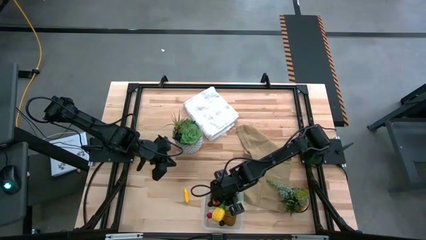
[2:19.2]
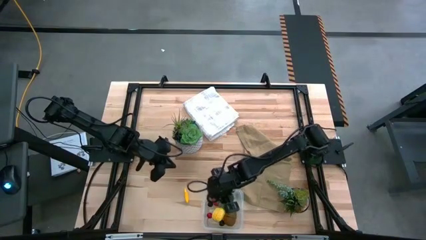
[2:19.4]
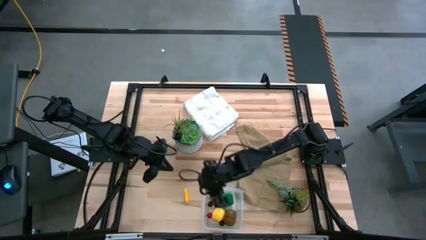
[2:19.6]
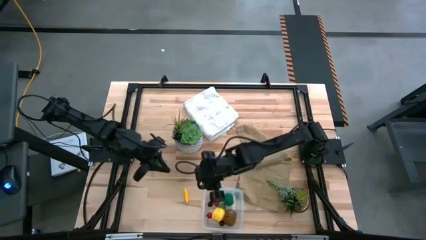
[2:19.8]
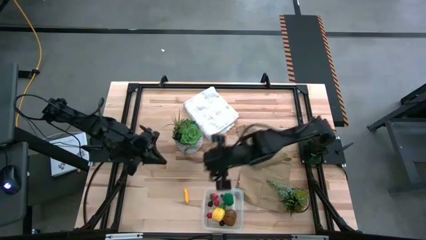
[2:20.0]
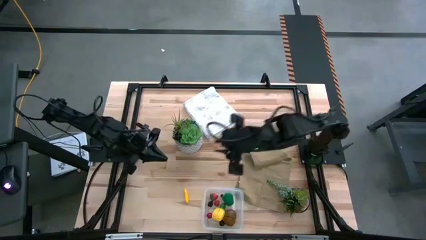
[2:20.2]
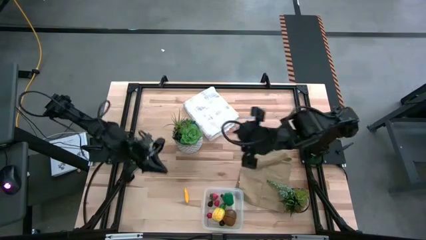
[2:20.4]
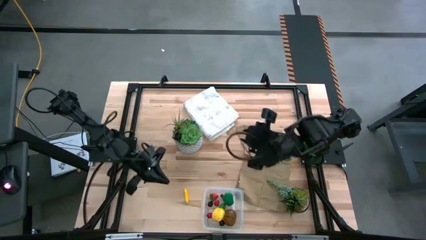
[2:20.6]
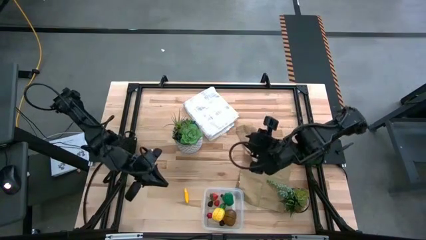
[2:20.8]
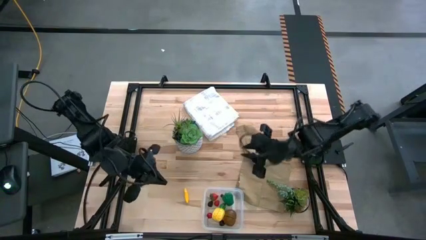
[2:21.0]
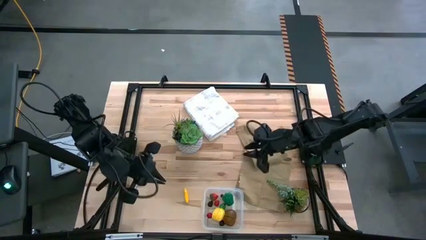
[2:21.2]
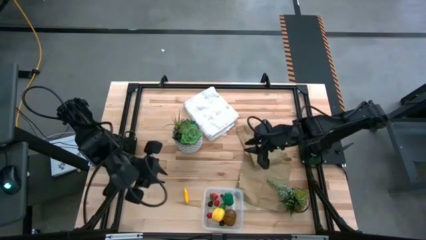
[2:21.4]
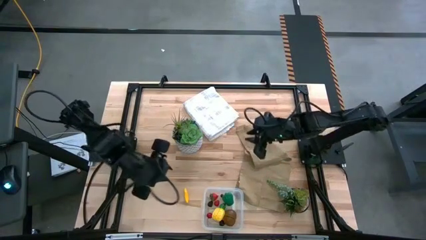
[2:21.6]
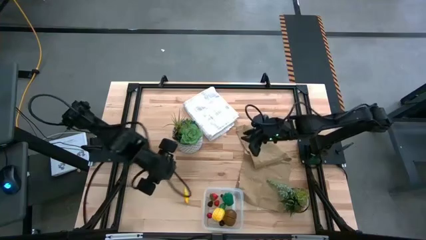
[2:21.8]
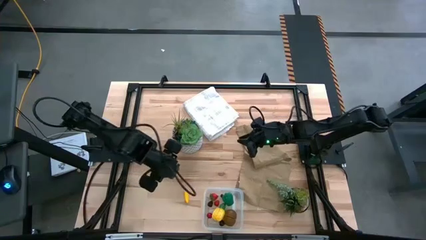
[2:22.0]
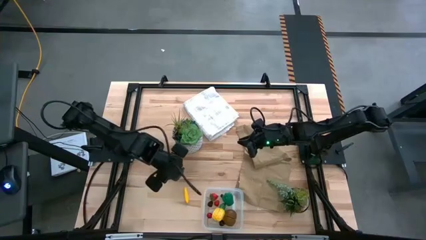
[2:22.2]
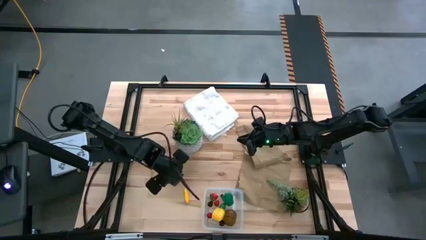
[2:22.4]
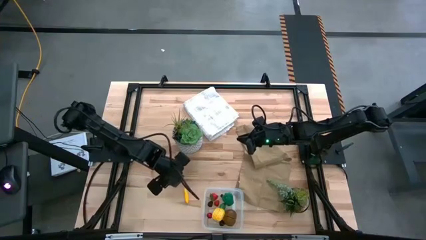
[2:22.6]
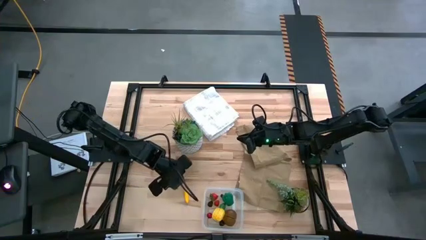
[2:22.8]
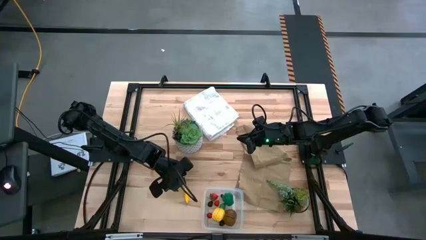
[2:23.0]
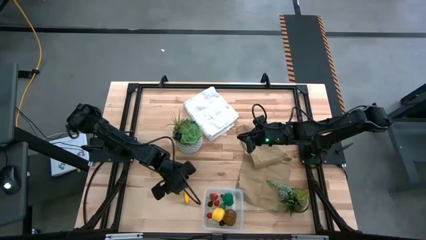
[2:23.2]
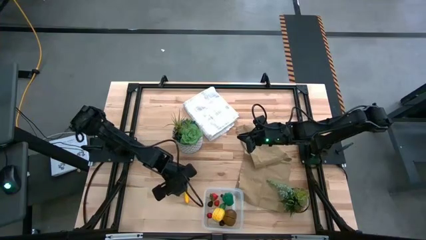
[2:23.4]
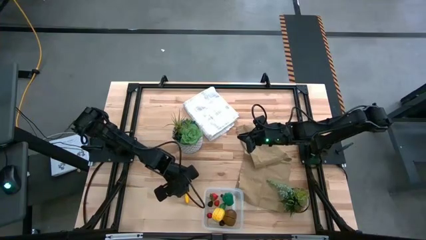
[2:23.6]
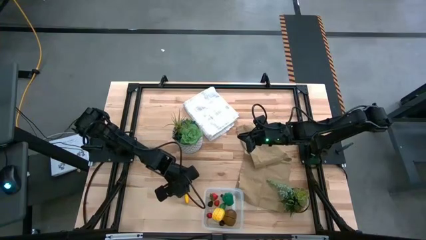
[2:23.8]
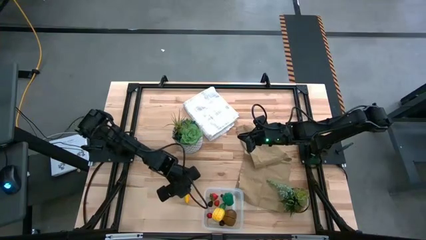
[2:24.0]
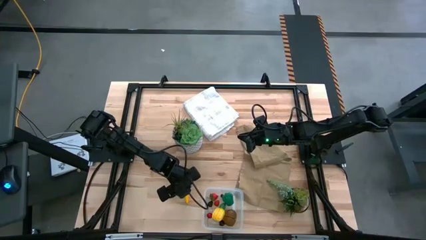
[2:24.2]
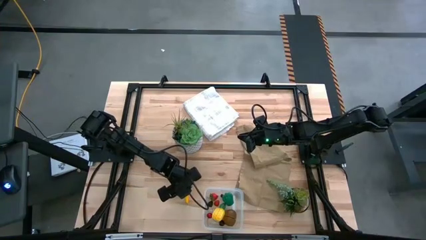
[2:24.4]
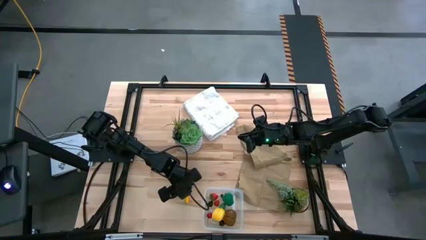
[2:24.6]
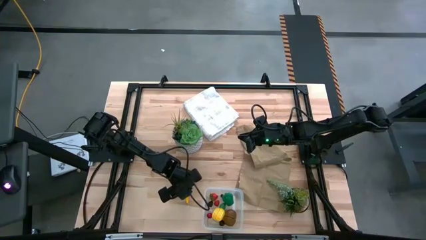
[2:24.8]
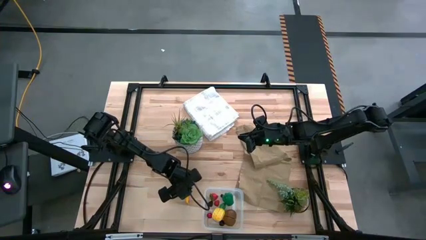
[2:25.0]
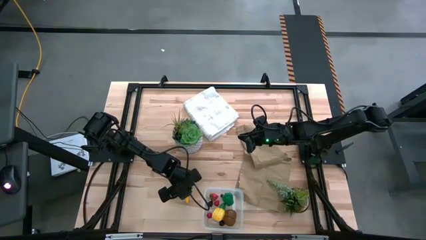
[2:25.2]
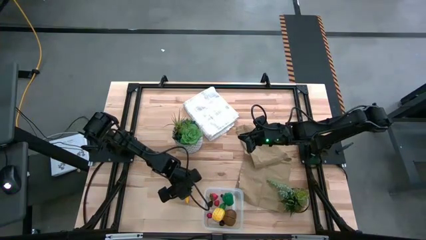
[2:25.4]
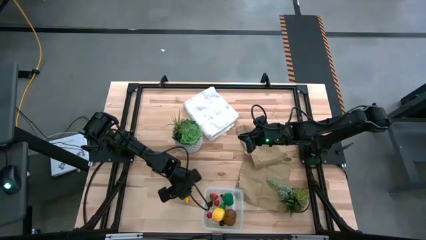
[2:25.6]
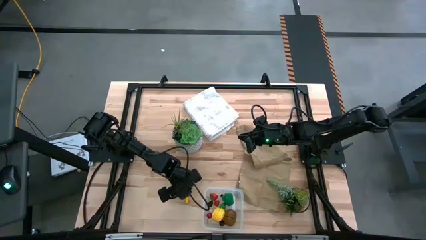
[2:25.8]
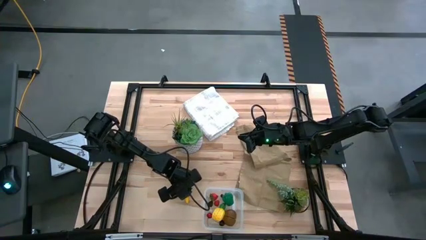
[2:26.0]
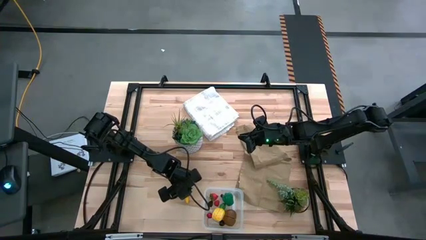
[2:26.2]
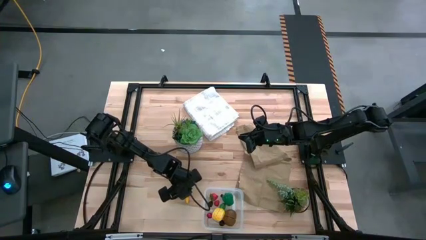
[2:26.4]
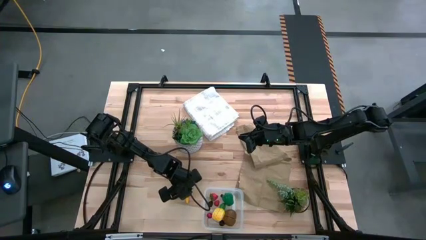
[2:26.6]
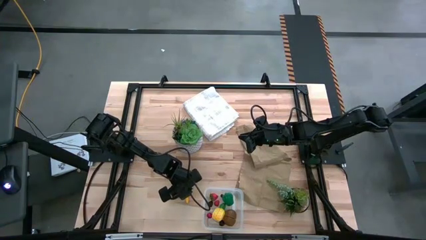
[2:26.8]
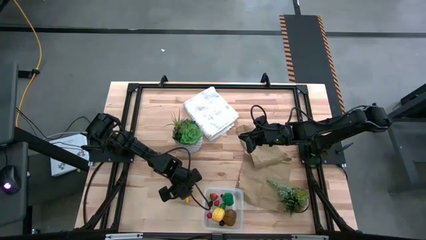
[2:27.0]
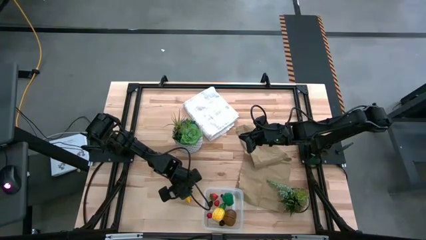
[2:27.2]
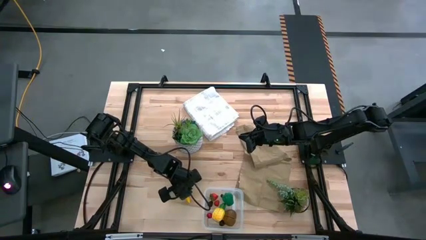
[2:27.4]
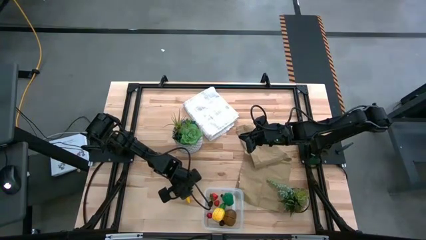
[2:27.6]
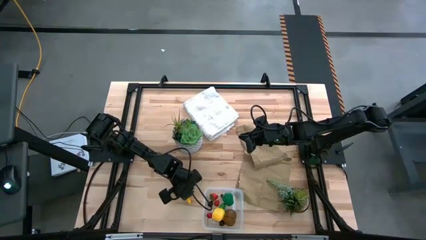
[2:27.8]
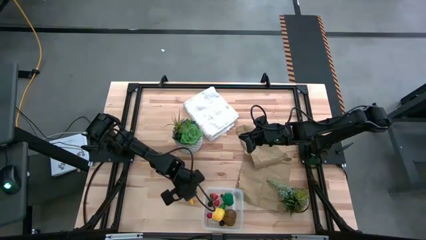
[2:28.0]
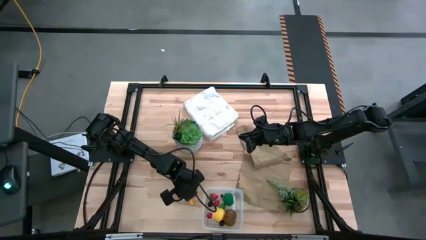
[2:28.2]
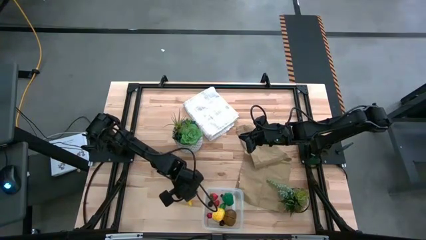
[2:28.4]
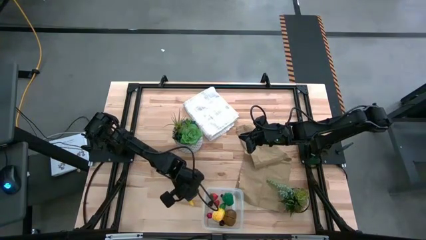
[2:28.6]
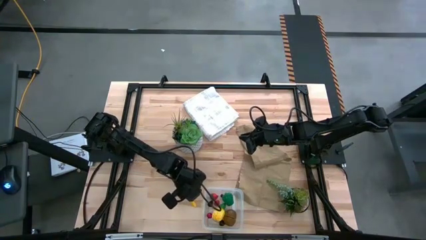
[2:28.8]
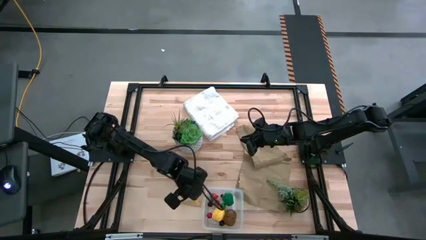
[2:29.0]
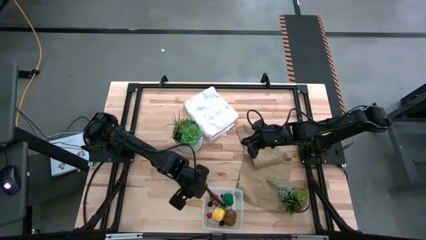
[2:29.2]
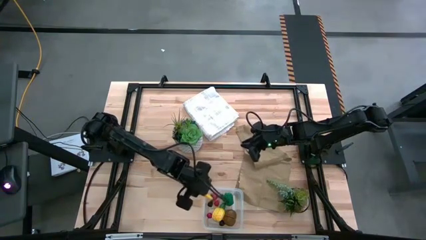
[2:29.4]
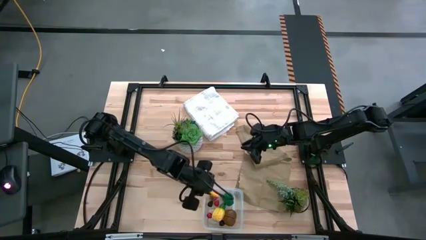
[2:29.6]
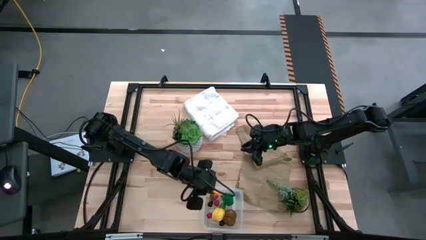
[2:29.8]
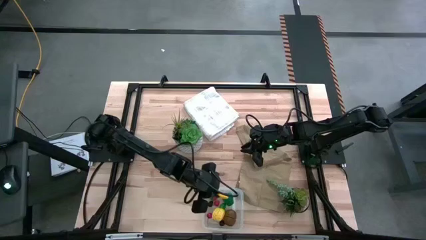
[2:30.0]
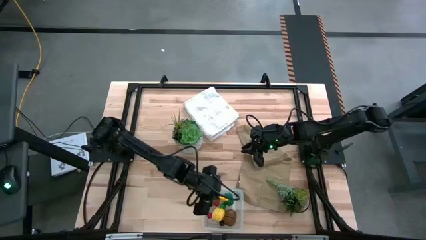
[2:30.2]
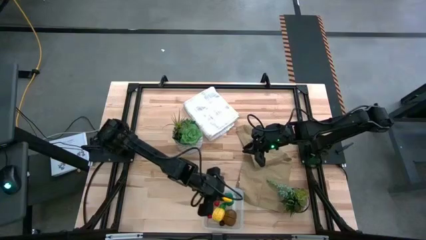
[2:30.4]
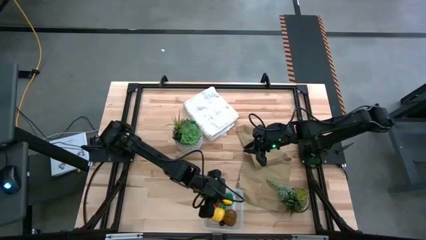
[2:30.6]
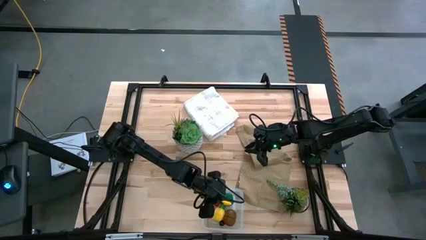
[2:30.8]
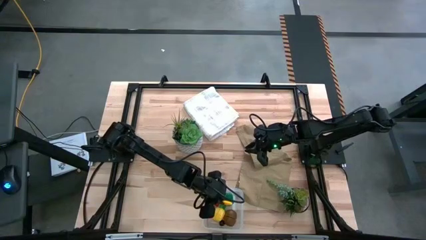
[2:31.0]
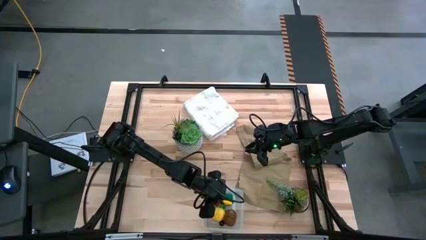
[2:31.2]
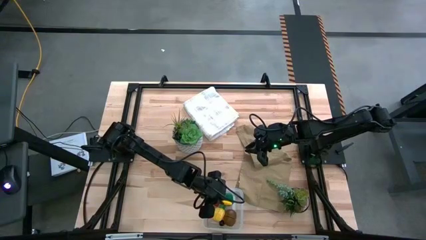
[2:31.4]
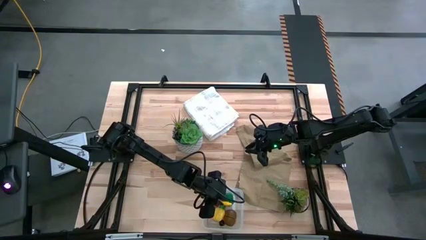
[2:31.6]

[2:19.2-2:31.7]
Task: Pick and placing Produce into tupperware
Put the yellow corn into the transparent bin

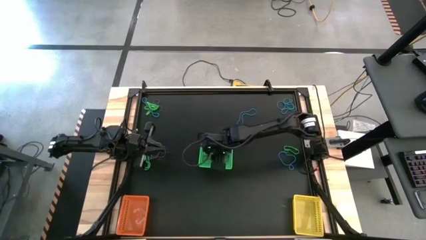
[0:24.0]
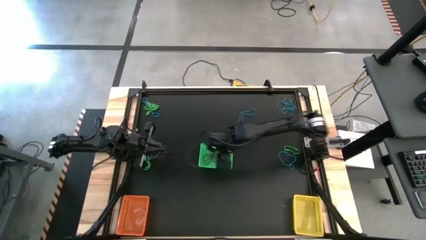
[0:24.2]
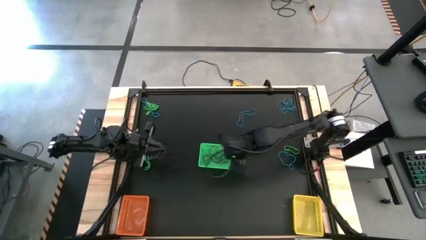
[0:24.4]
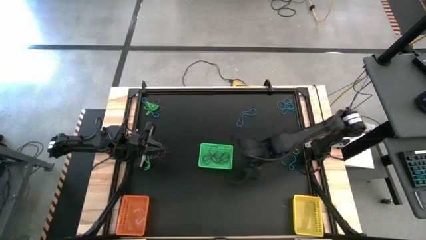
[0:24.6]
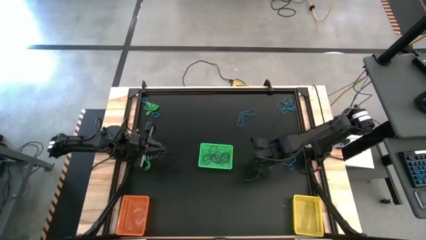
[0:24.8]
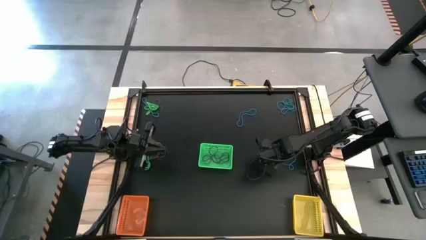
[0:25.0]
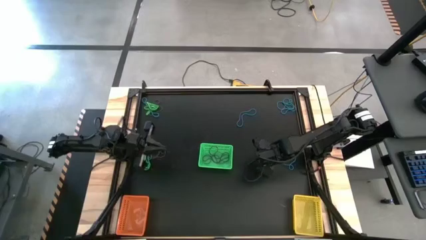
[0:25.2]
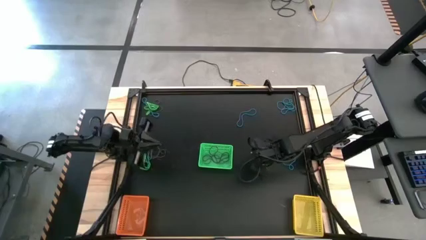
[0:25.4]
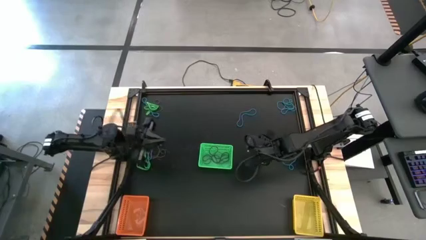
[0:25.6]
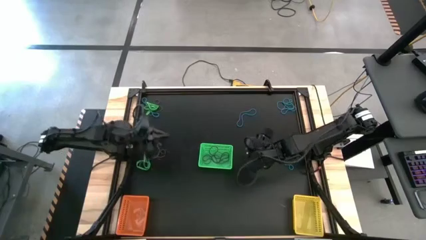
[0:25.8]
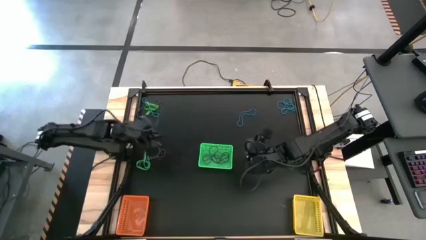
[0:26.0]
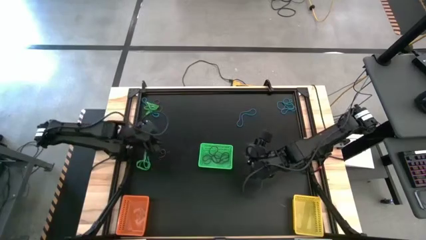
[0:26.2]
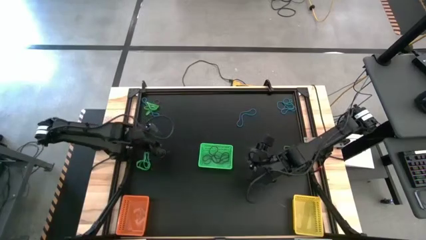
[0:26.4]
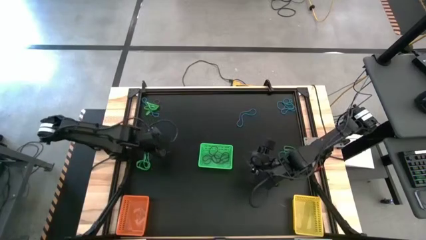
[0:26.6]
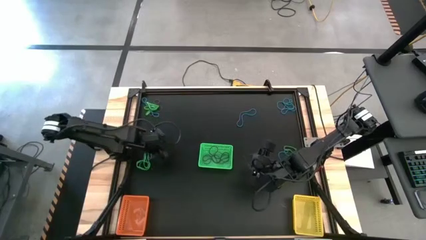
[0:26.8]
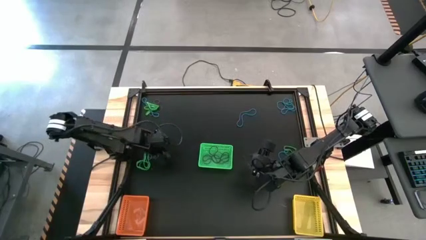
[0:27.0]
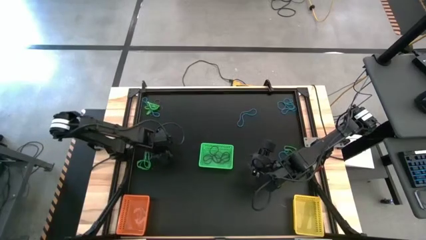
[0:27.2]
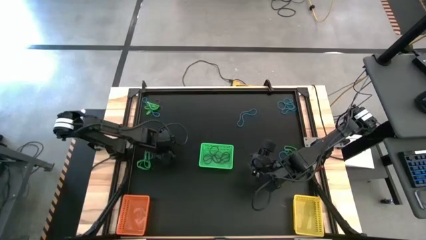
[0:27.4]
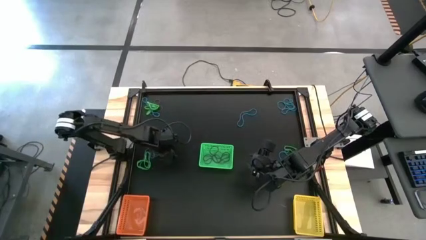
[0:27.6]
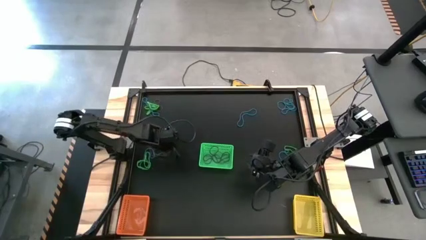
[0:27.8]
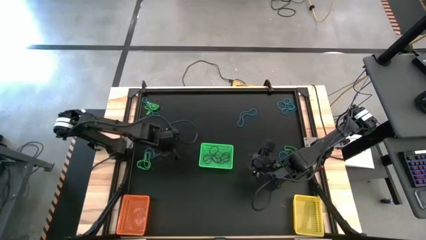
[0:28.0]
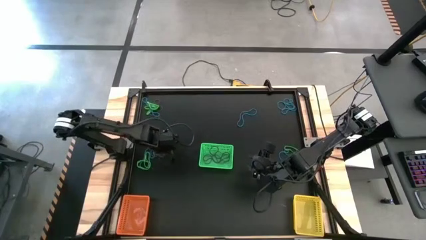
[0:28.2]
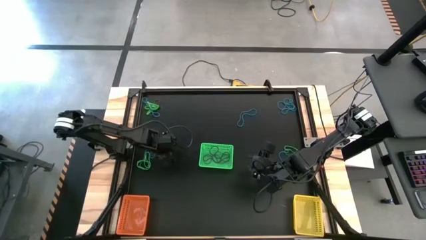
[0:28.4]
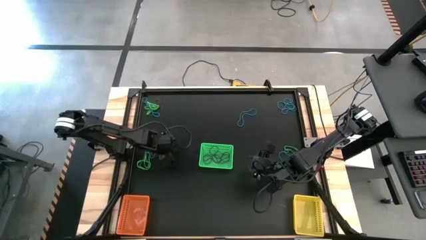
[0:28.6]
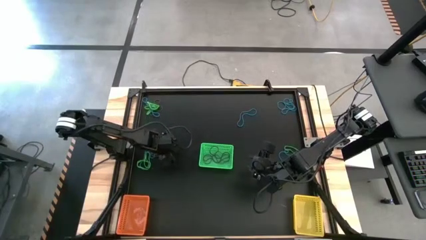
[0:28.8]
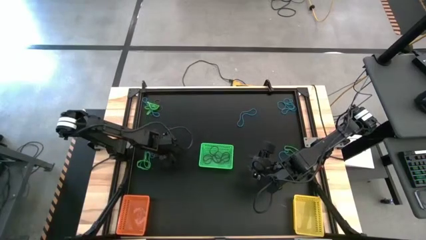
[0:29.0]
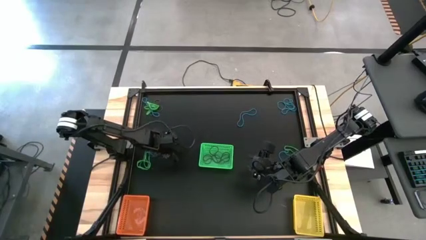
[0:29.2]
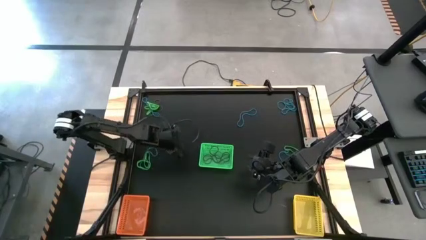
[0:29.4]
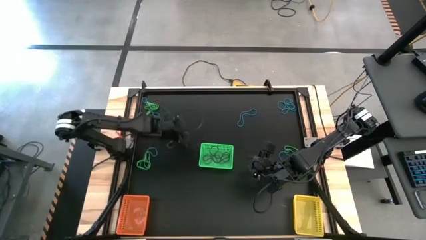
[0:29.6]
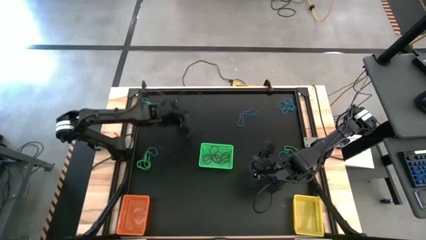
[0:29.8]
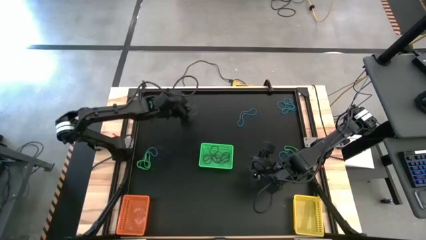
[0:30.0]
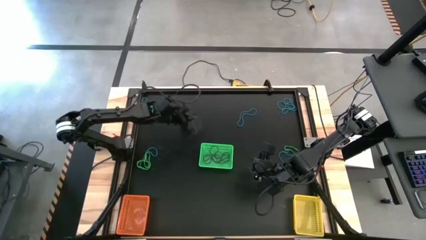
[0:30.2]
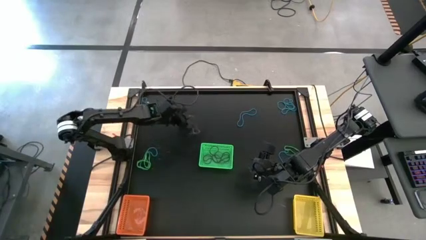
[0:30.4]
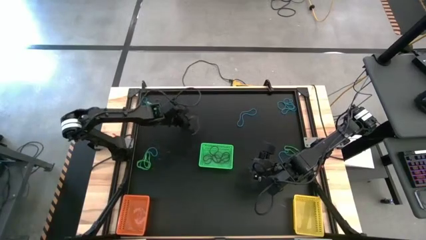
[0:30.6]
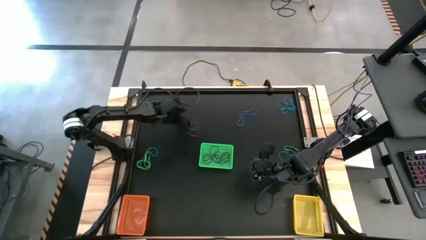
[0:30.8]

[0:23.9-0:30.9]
Task: Sort rubber bands into baskets
Put the violet rubber band into the green basket
